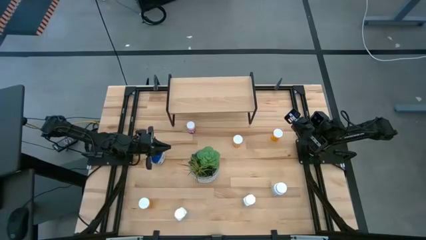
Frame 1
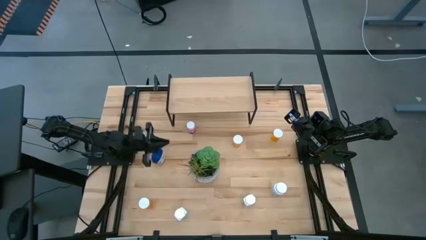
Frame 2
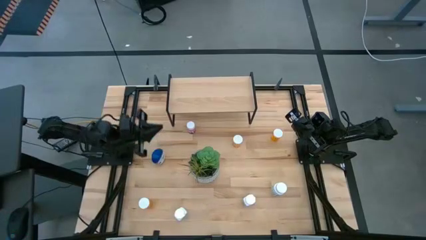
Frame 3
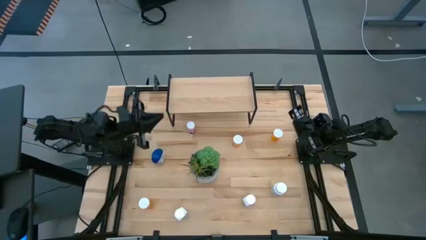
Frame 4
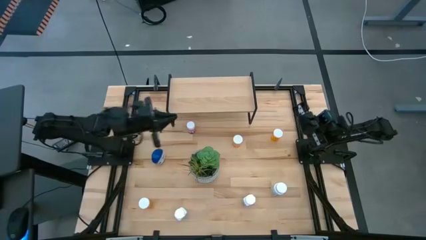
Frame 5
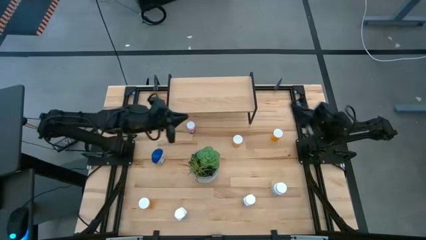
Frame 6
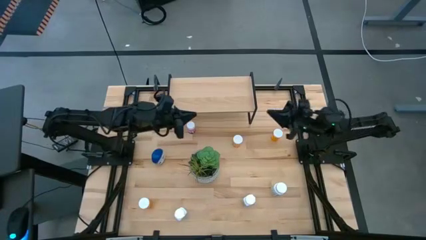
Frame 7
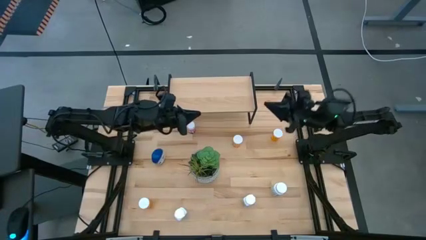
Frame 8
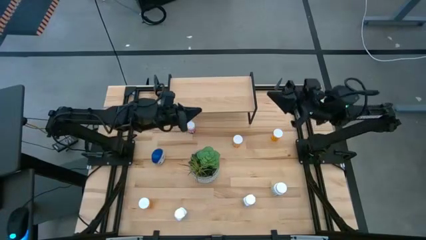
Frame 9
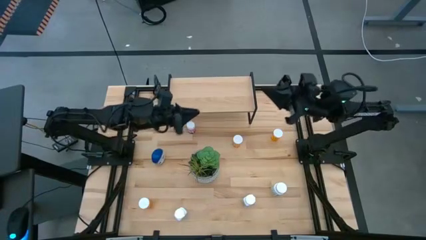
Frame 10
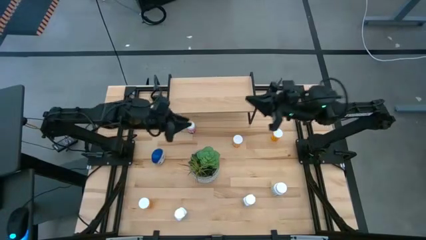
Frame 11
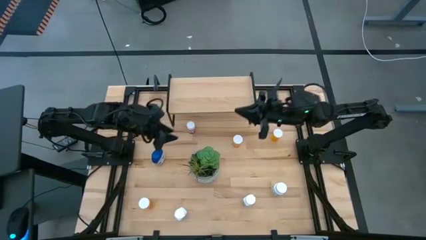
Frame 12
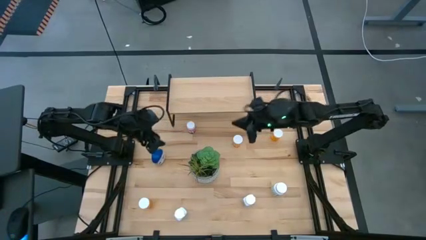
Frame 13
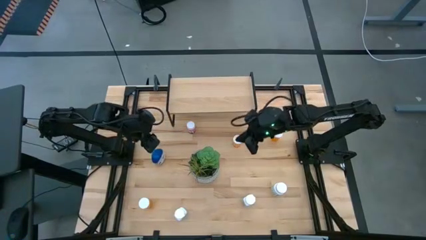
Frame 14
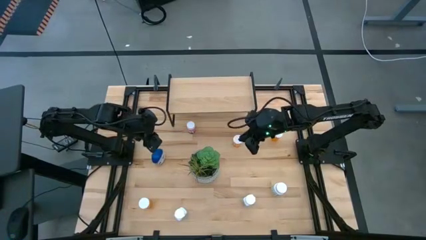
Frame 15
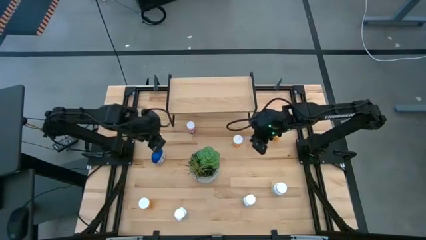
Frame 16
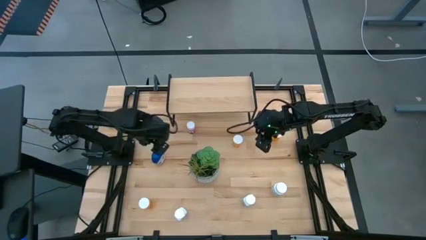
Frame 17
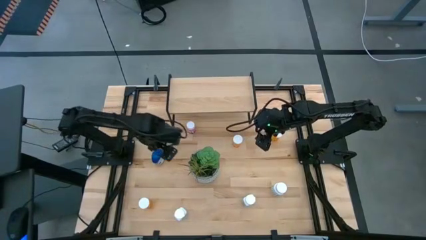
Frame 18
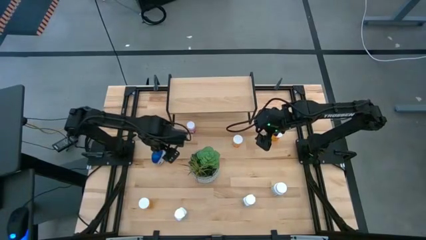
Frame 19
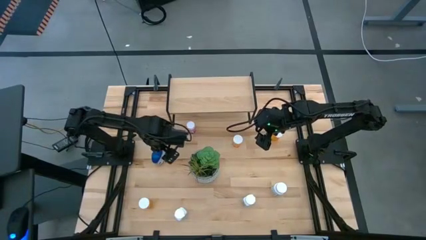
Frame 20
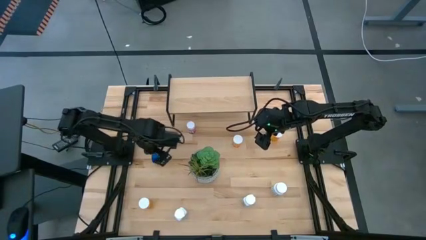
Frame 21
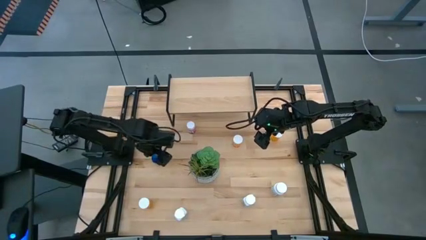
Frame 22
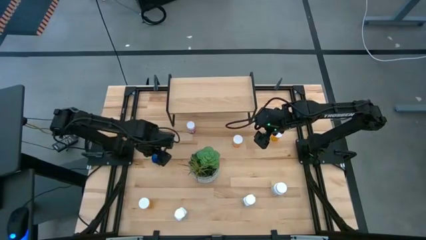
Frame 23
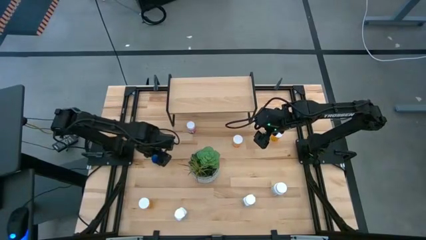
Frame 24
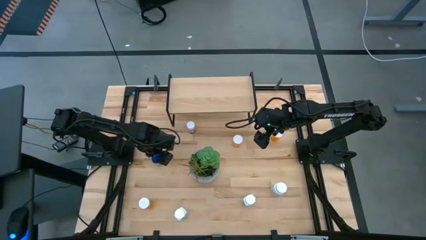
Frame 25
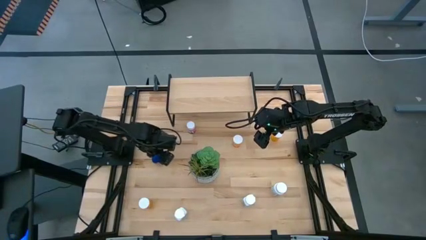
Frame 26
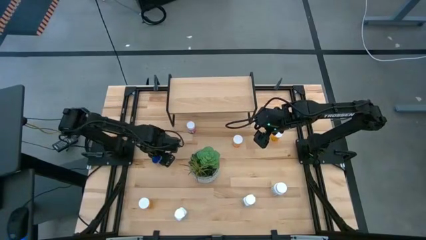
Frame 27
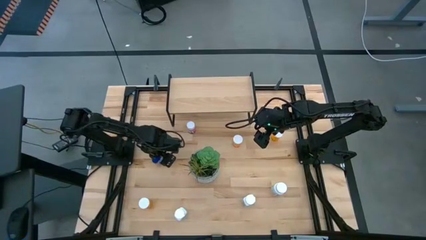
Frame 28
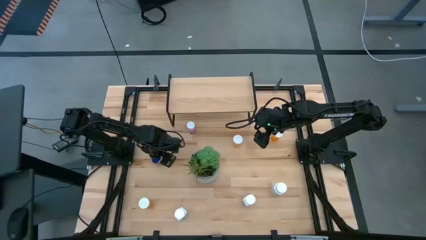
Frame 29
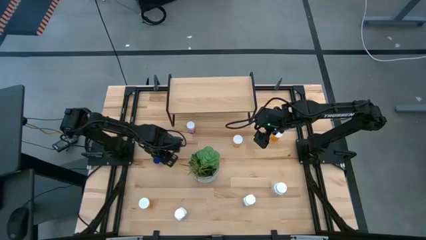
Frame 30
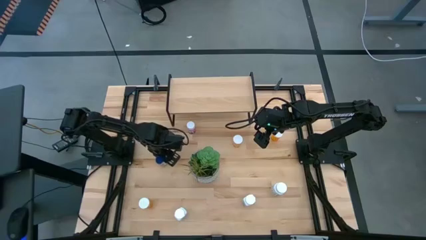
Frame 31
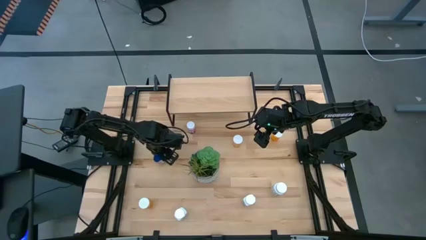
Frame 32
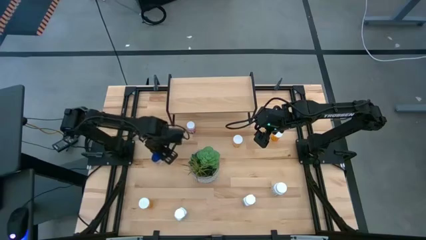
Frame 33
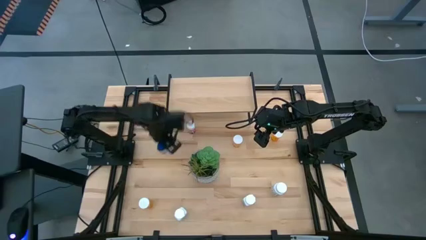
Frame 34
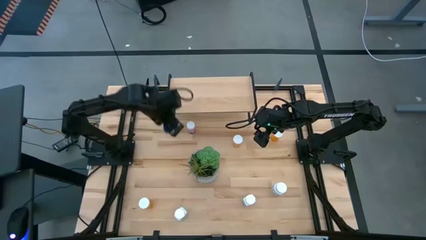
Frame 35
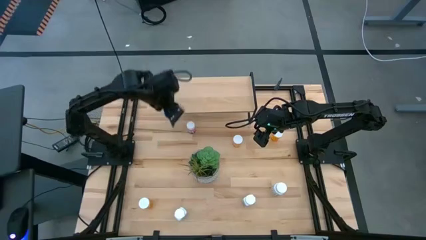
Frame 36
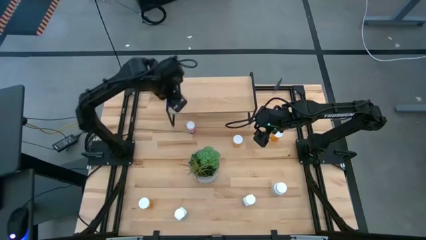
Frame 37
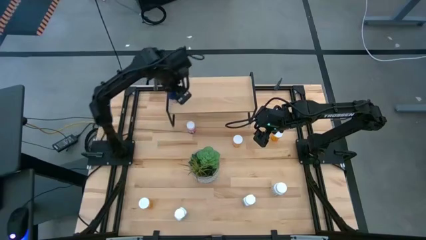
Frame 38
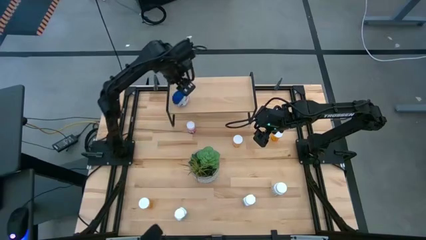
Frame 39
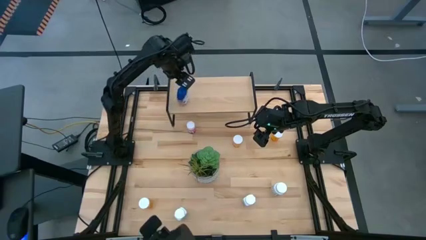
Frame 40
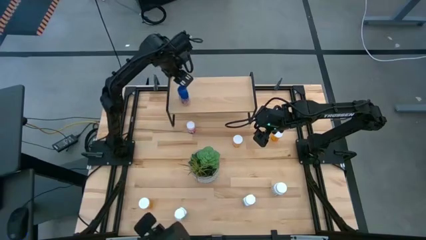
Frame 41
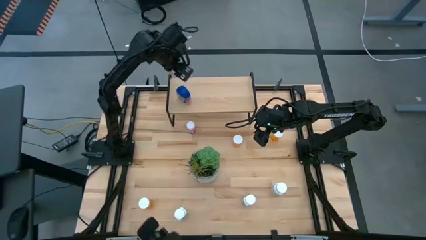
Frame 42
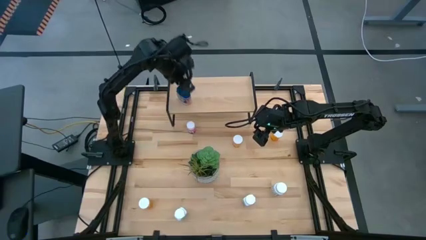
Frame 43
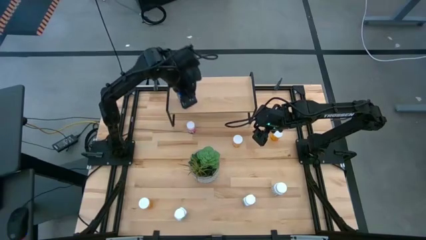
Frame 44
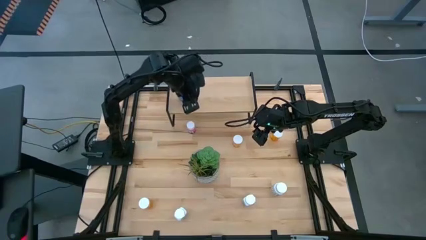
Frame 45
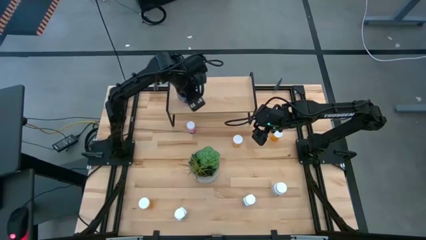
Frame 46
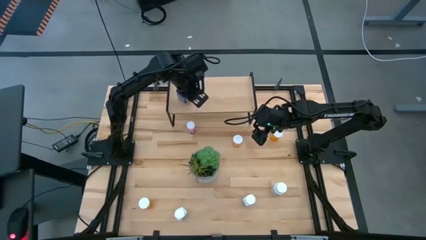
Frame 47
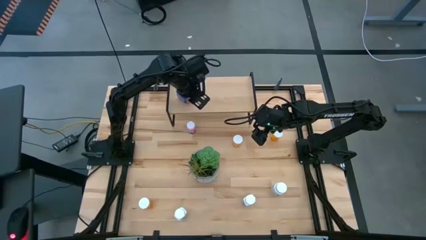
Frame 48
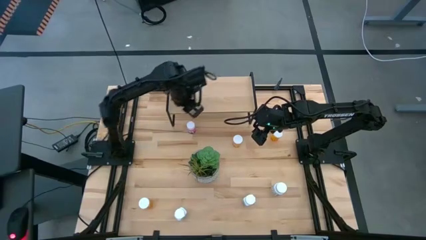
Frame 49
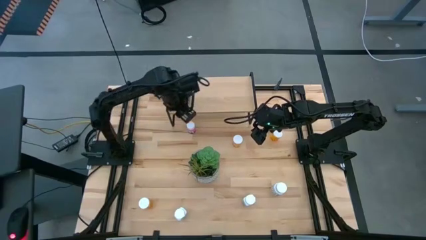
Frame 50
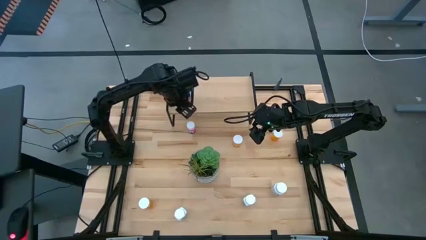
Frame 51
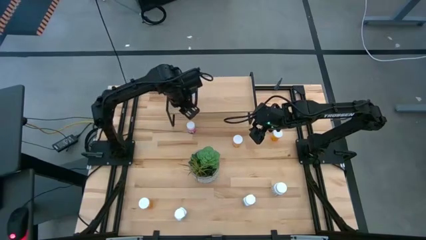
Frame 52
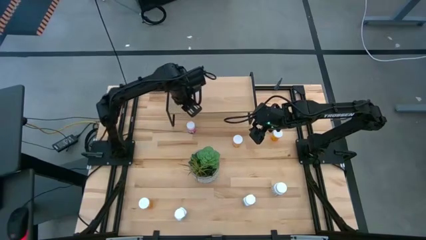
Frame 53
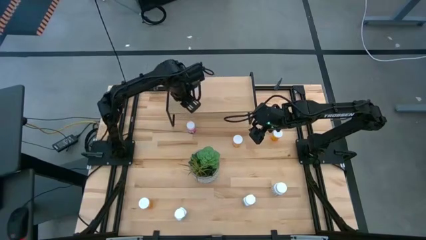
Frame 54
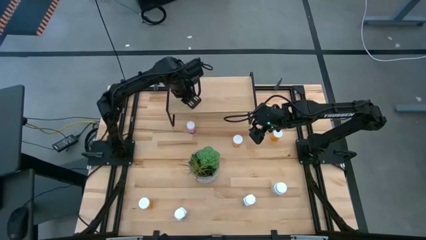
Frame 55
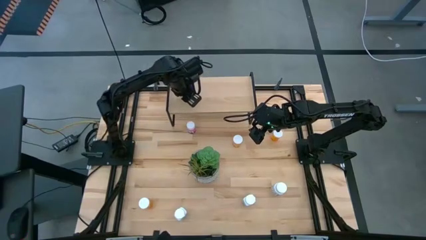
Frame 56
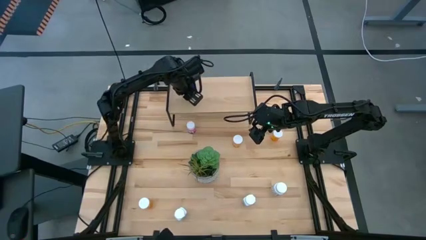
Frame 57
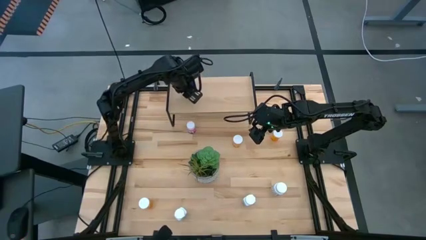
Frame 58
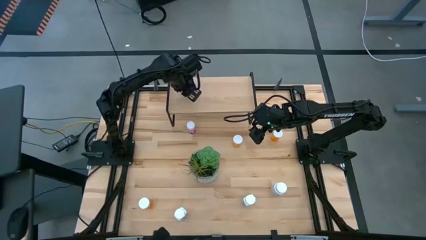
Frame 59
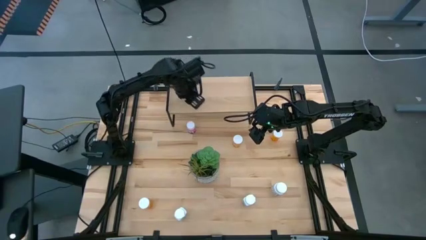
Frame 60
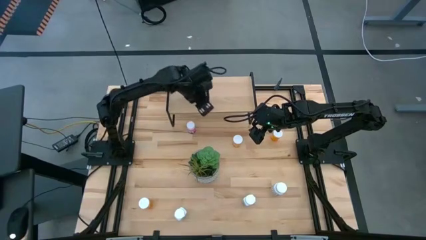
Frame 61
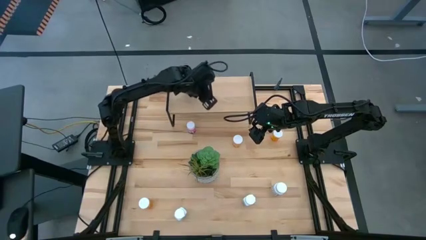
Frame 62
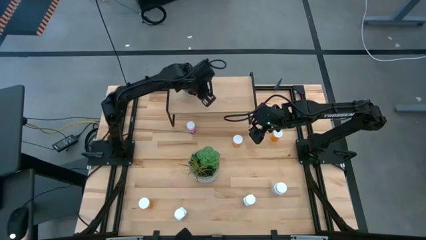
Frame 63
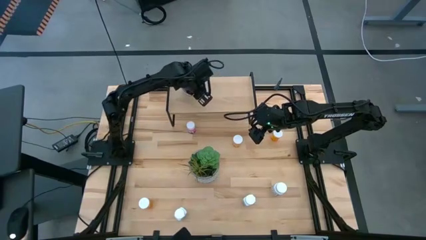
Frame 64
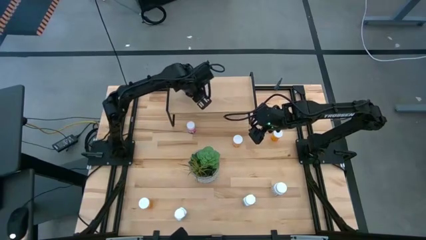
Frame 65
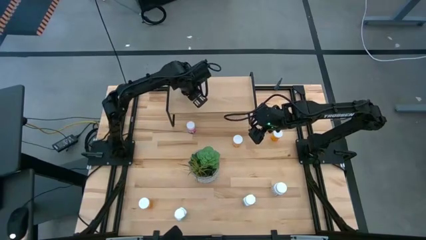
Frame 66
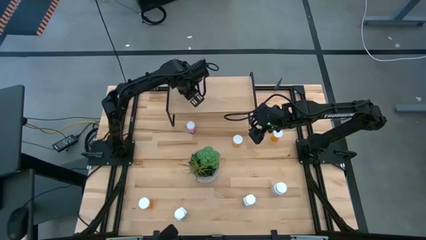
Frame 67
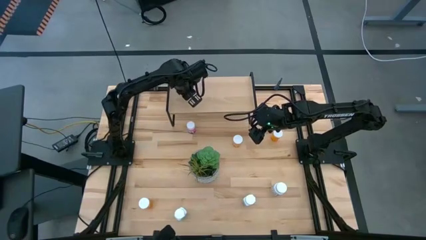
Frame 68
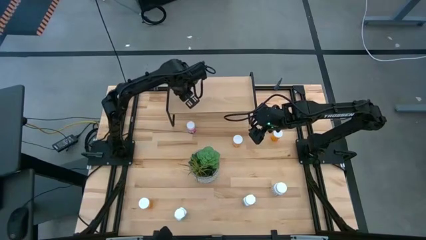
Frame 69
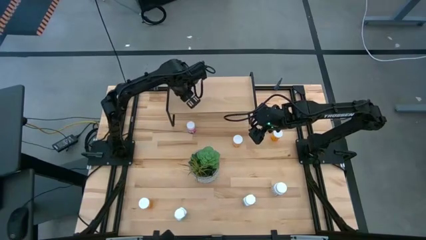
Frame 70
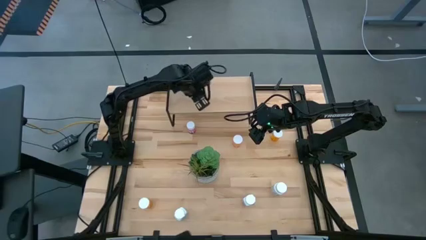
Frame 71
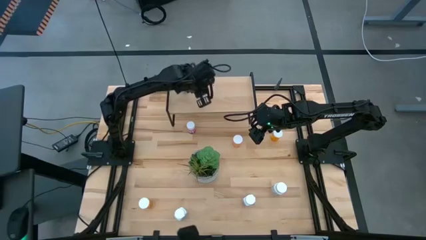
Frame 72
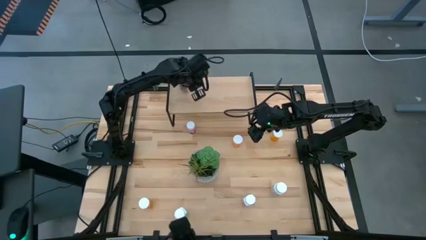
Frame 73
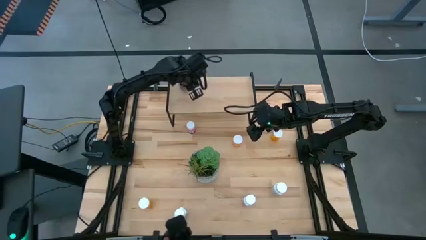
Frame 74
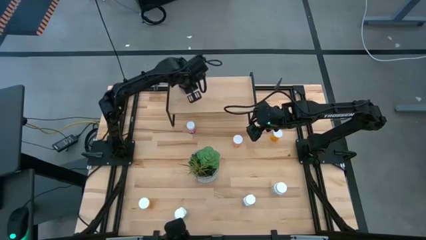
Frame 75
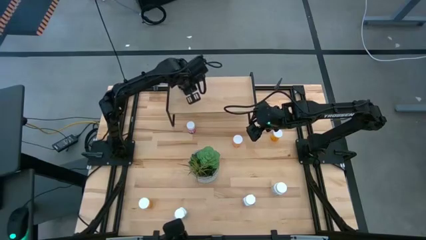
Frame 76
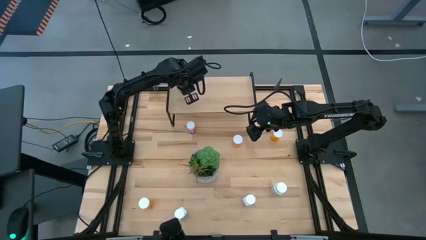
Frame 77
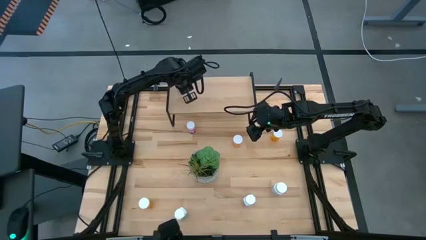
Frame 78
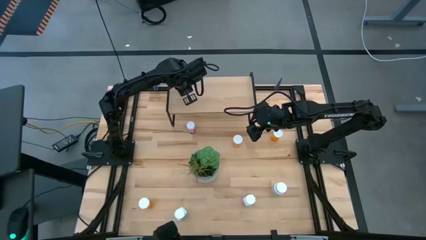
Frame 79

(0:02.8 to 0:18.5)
Task: Pick and place medicine bottles onto shelf by color
Put the blue pill bottle on the shelf

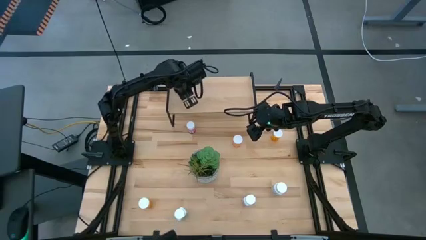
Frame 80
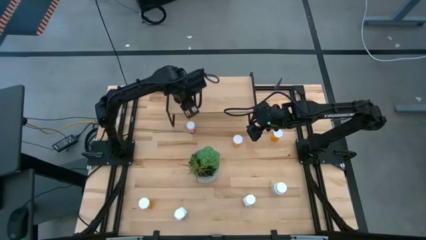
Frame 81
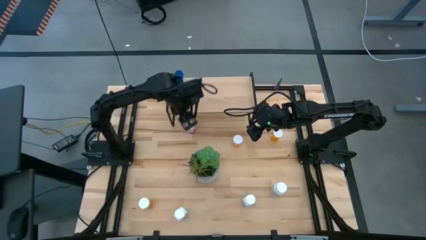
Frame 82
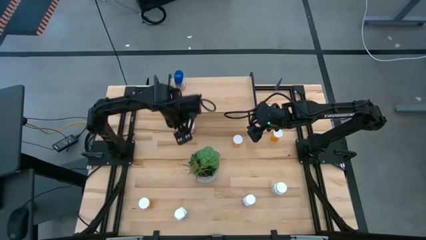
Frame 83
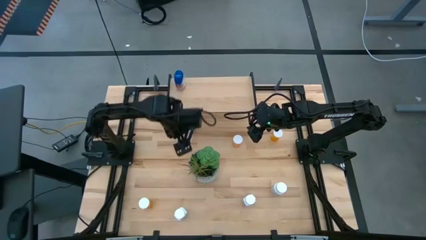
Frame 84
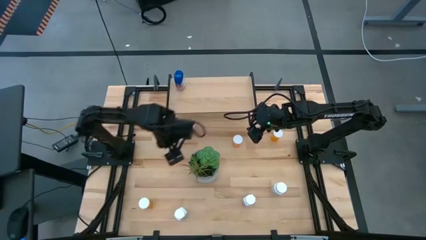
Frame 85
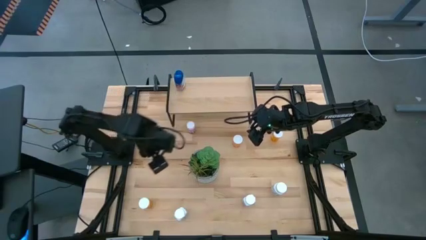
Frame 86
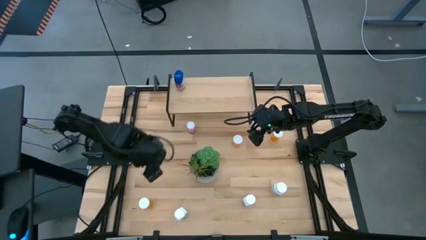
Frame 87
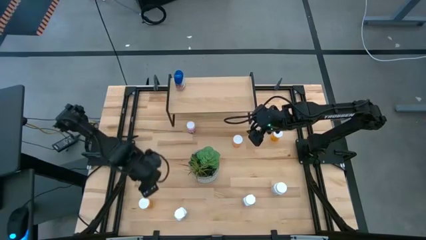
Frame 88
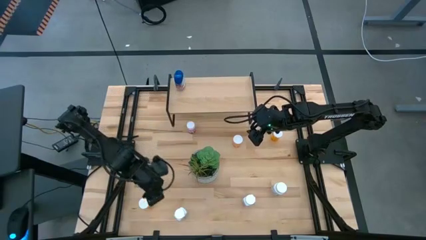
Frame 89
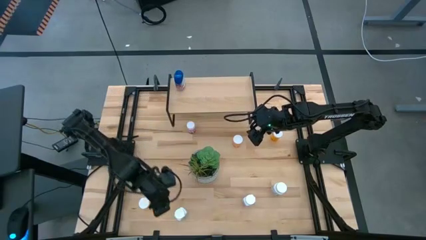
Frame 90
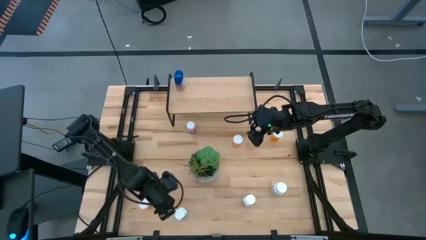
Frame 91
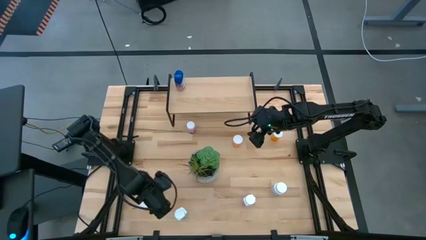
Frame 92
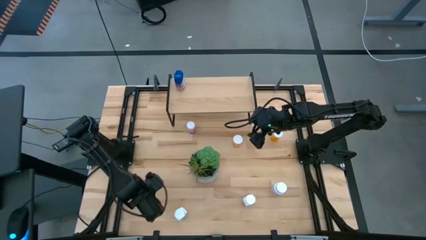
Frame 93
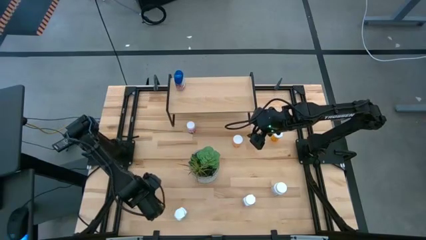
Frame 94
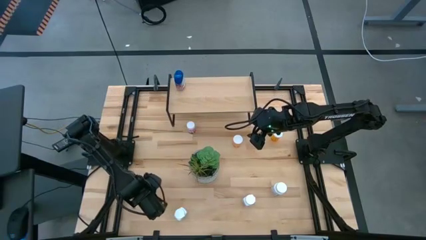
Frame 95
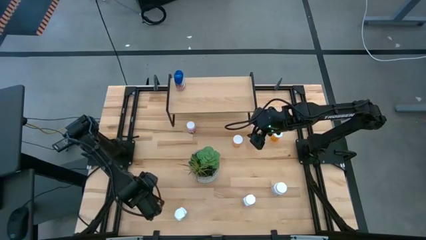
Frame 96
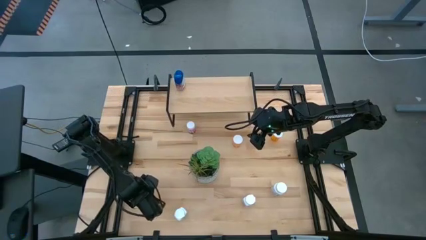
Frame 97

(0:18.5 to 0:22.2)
Put the bottom orange pill bottle on the shelf
